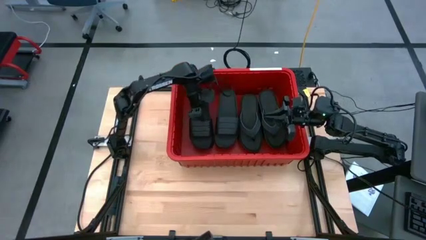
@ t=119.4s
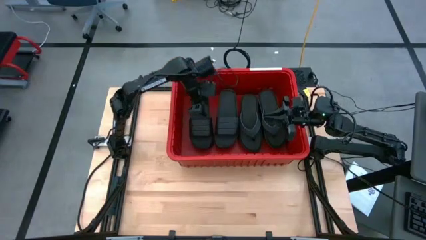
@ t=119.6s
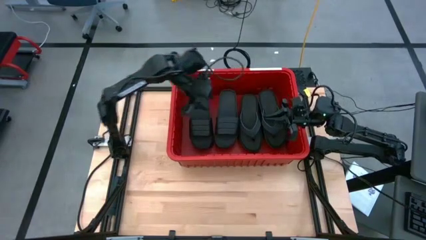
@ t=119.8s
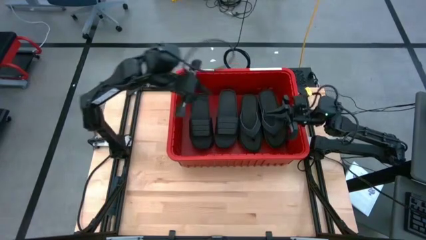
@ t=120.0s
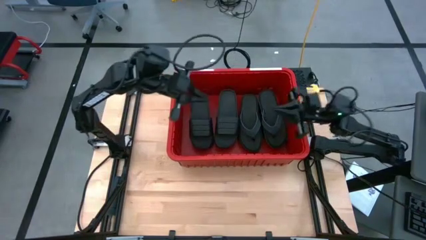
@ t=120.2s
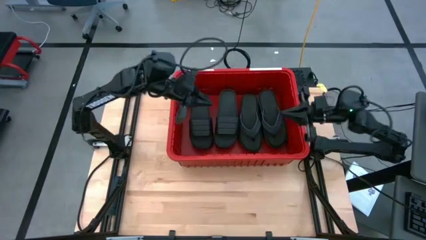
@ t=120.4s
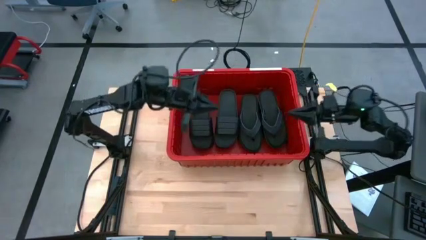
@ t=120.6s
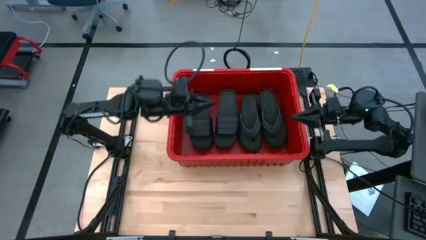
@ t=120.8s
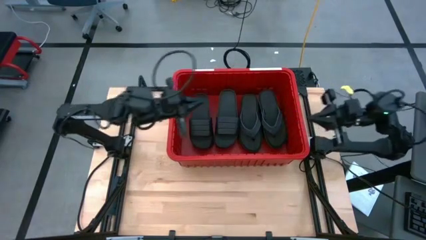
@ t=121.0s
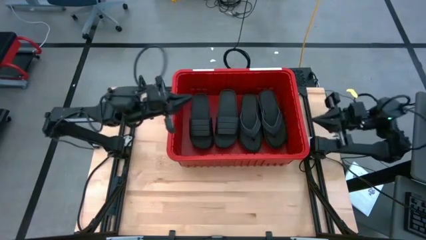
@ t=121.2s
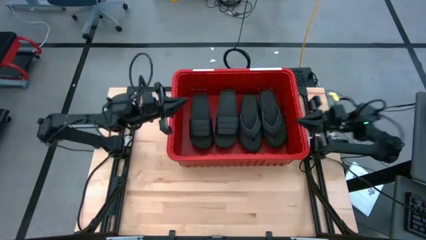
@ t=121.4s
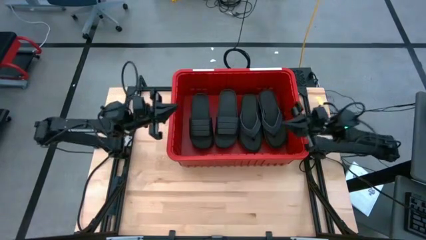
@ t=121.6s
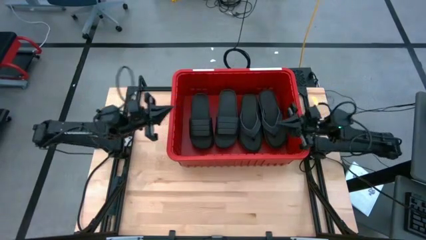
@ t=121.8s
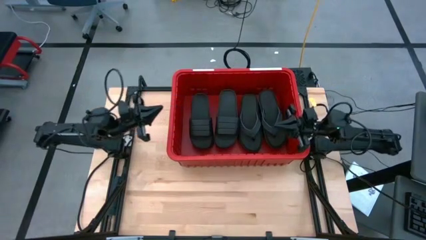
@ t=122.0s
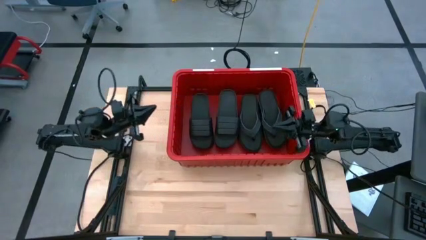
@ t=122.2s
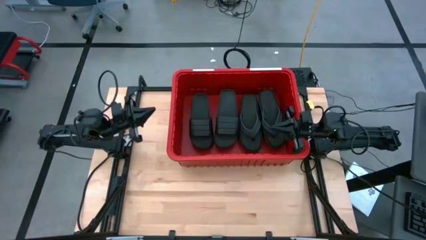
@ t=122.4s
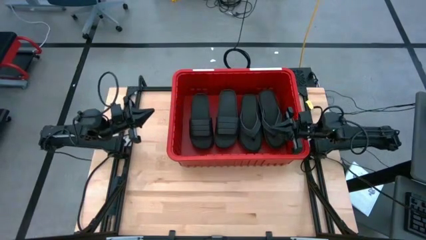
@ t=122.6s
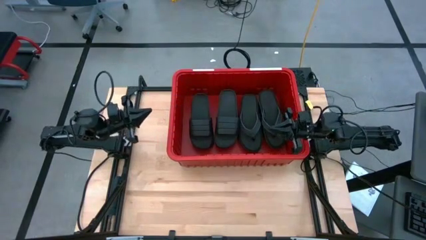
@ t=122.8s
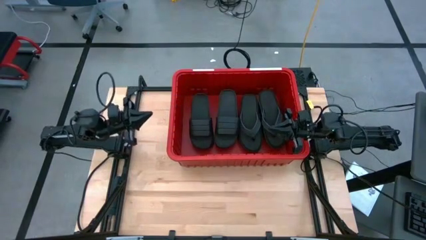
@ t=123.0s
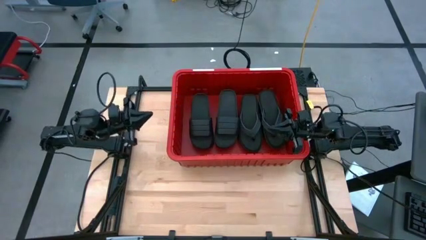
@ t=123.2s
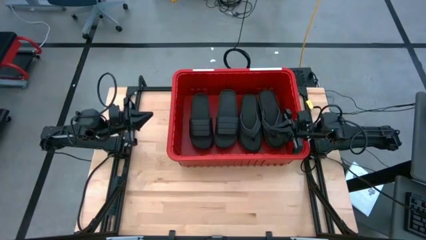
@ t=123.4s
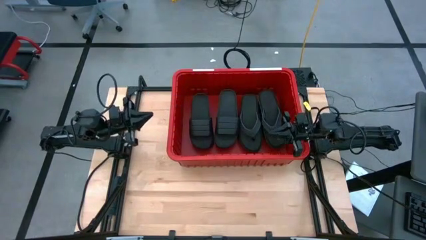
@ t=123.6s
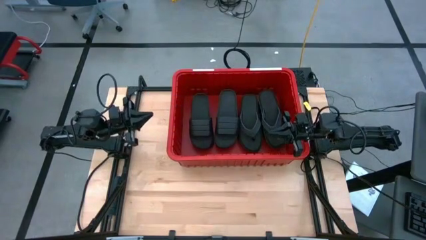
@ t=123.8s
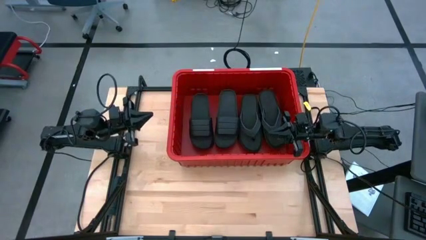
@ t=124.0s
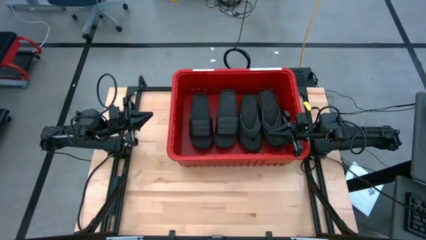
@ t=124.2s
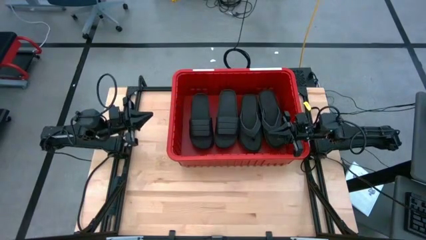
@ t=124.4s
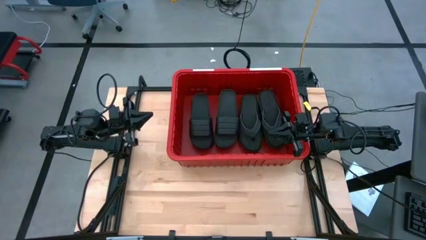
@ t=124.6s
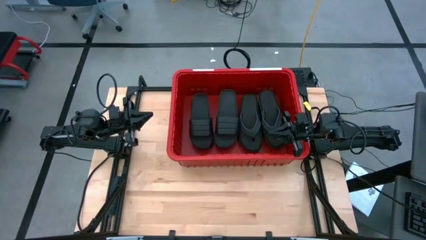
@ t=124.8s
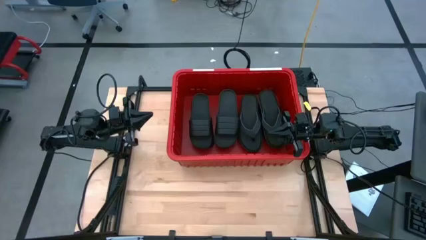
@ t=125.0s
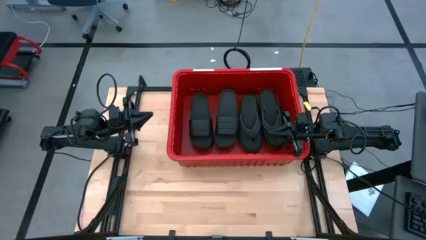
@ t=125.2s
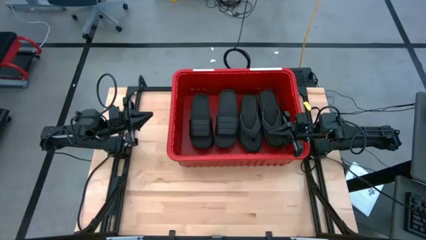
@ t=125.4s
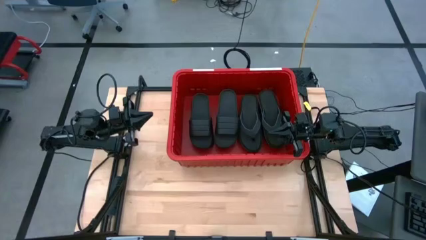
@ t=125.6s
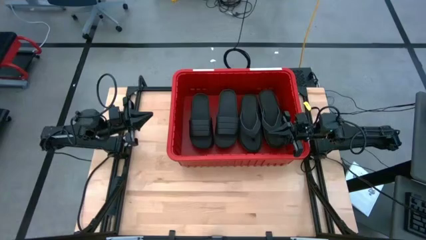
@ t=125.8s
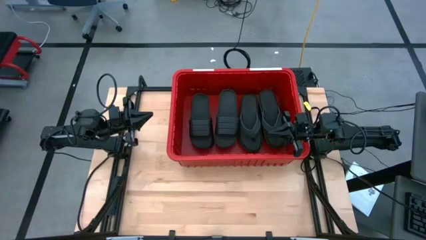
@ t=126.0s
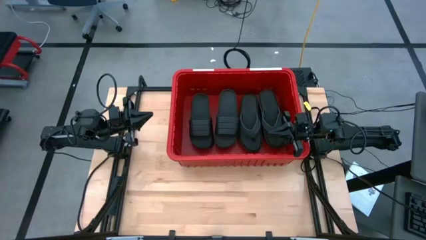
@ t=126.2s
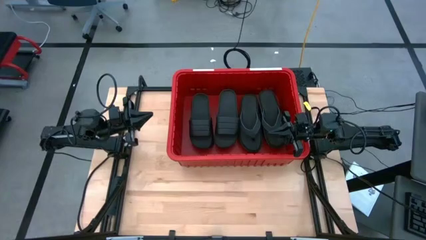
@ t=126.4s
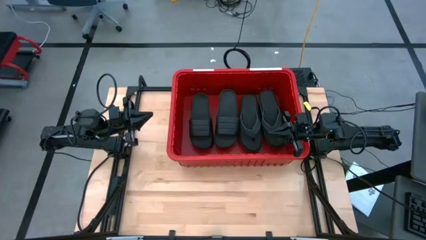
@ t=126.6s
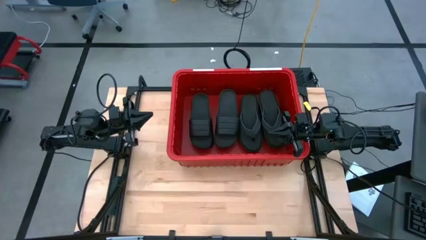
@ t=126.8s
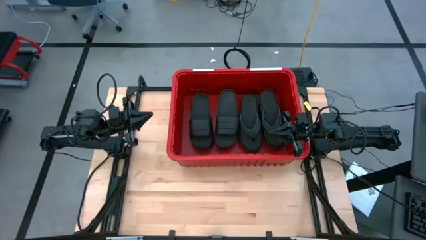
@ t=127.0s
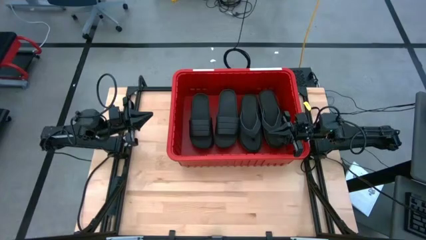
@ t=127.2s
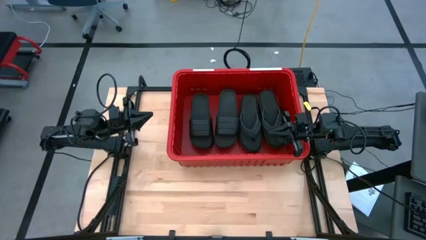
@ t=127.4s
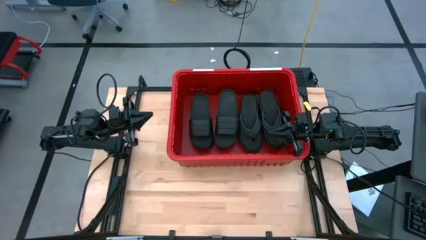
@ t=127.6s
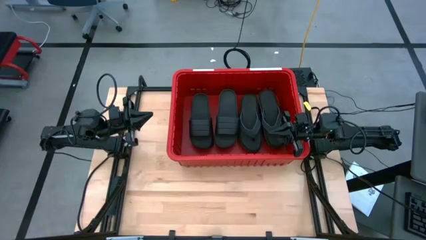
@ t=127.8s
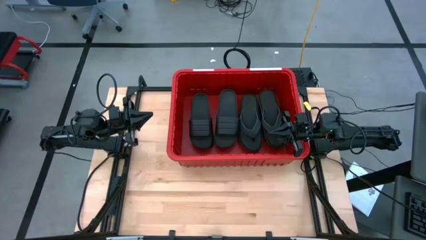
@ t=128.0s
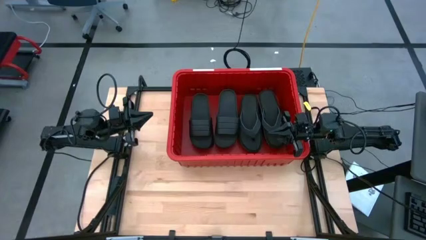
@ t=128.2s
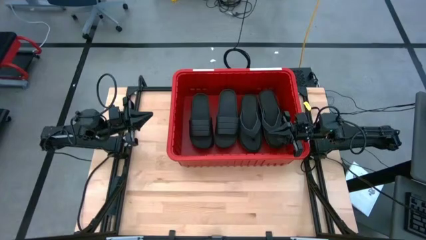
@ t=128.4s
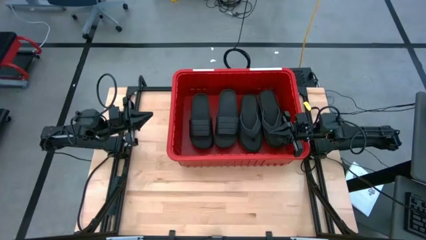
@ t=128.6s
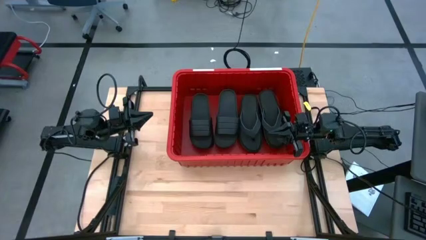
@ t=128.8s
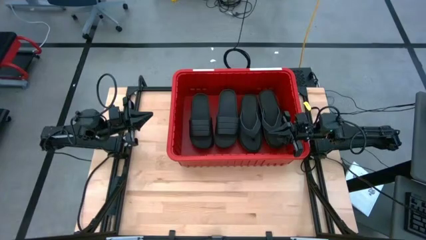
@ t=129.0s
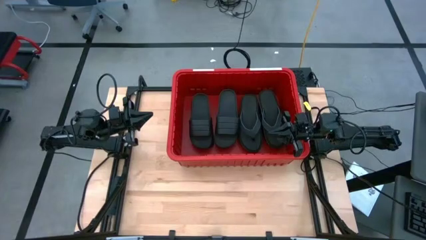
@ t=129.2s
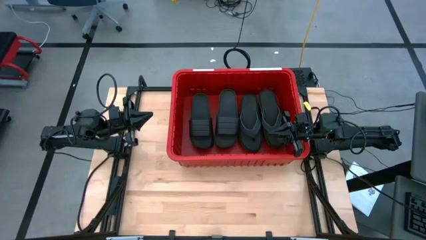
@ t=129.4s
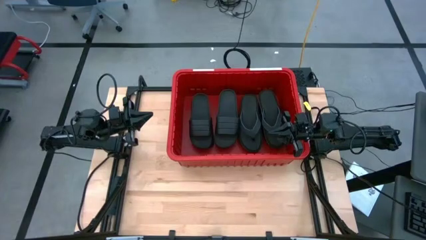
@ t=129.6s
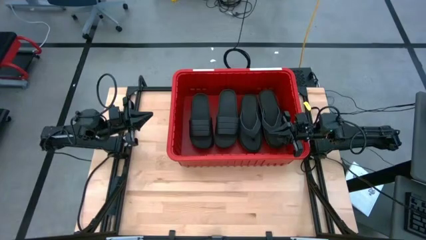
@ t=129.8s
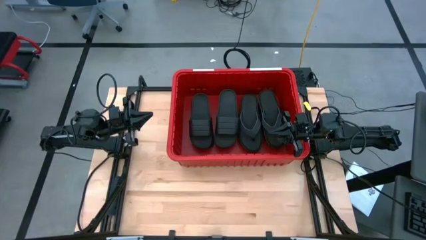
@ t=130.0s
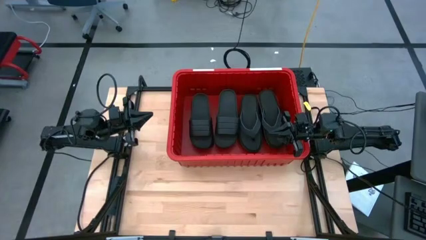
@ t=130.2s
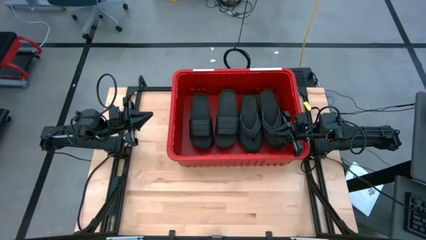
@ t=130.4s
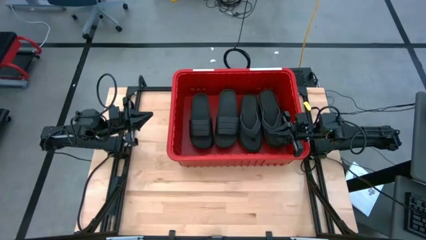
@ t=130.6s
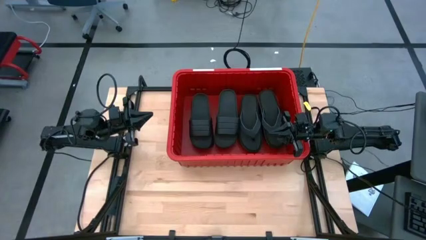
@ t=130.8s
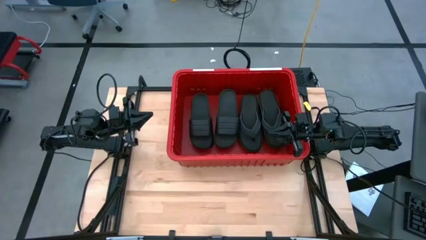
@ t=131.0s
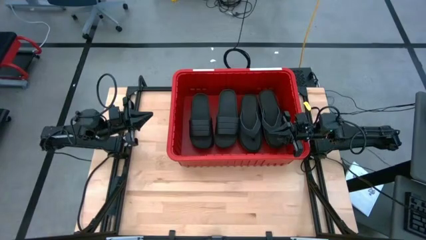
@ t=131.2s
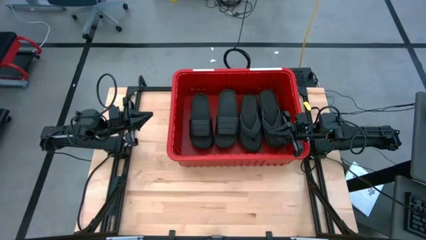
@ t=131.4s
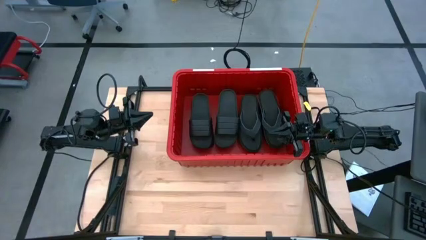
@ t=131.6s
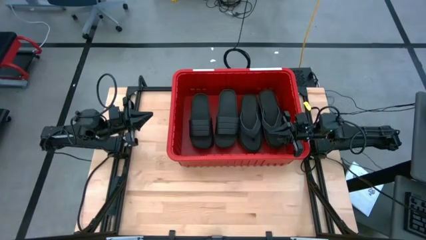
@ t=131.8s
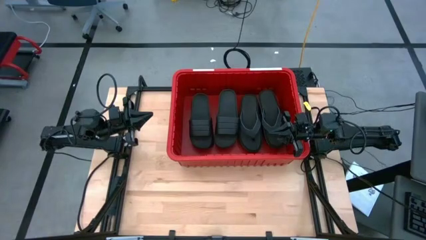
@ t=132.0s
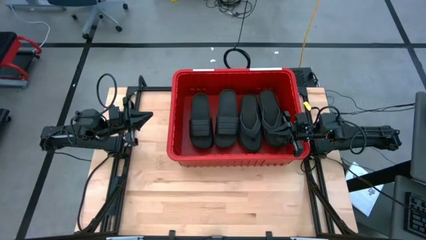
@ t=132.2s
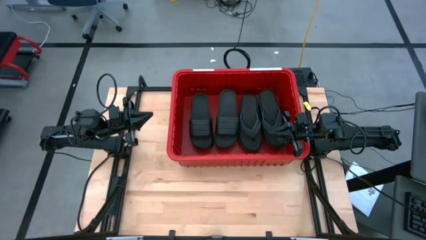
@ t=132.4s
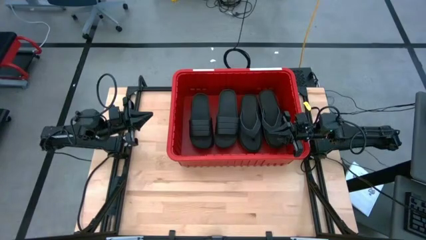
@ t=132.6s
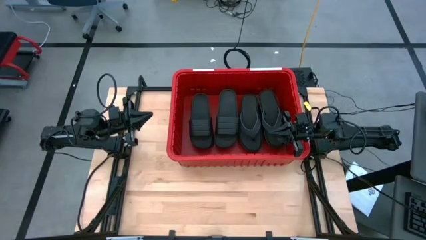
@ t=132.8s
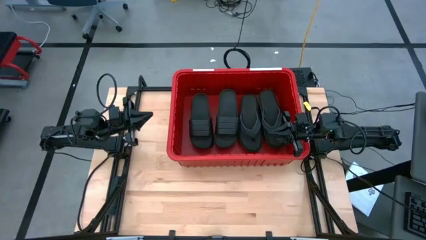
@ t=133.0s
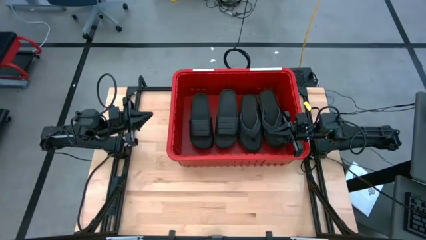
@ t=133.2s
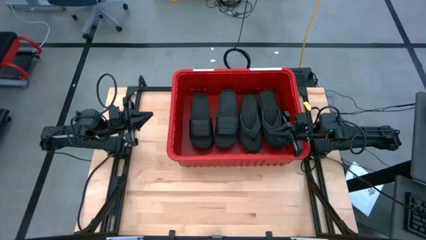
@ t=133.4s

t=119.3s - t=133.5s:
Task: Pick and place slides into bin
Return to Home Position

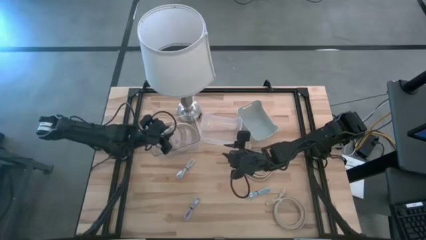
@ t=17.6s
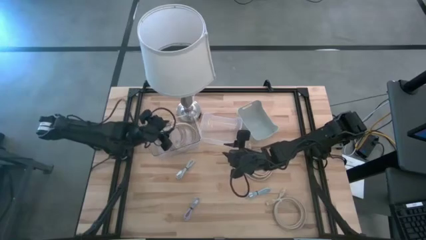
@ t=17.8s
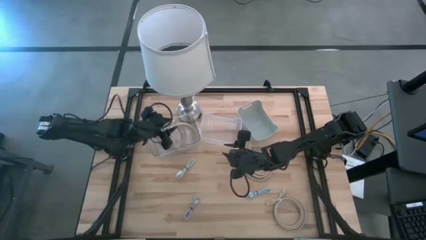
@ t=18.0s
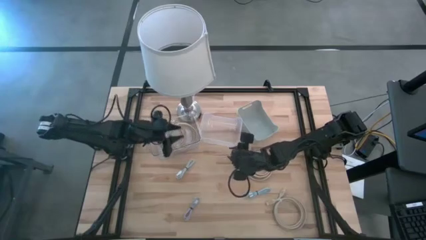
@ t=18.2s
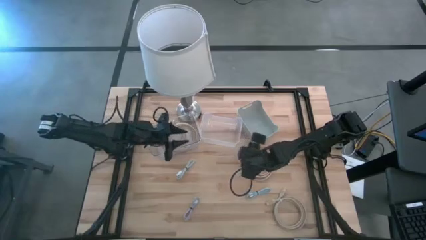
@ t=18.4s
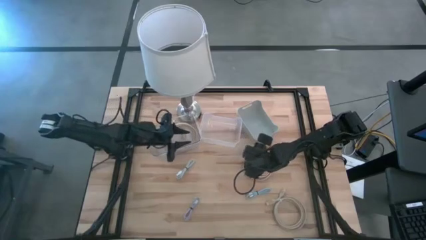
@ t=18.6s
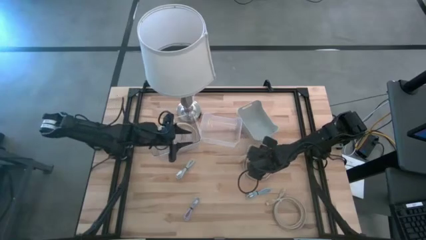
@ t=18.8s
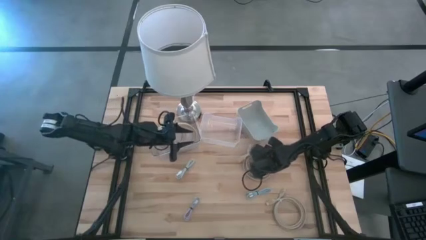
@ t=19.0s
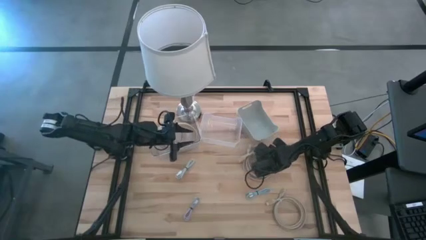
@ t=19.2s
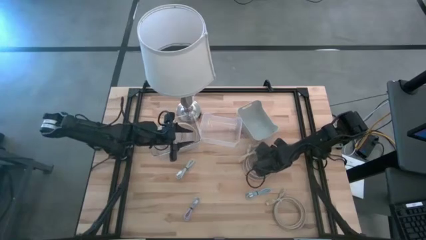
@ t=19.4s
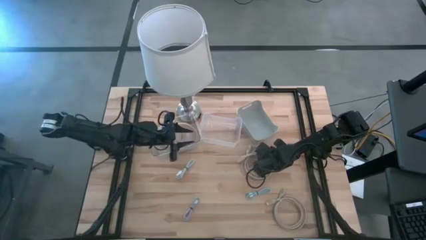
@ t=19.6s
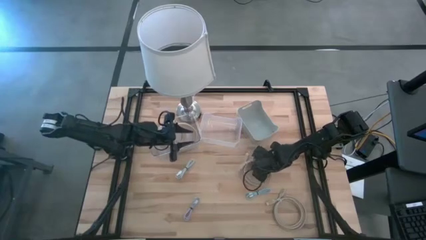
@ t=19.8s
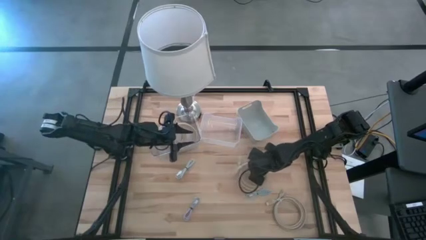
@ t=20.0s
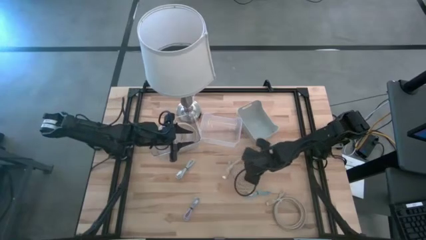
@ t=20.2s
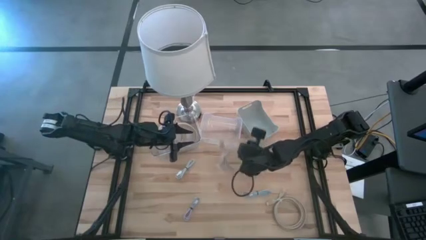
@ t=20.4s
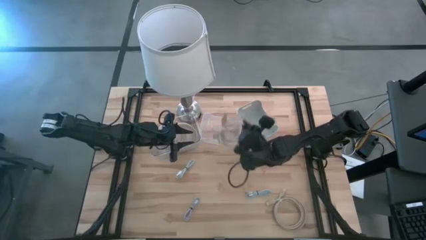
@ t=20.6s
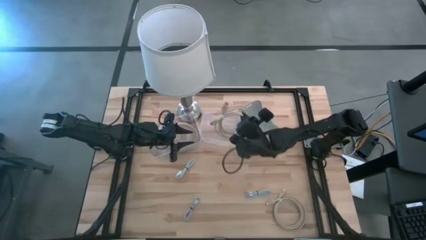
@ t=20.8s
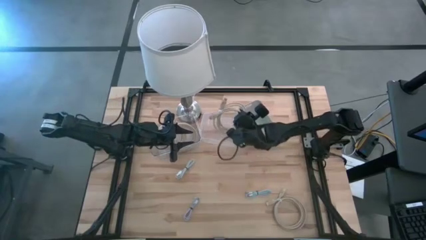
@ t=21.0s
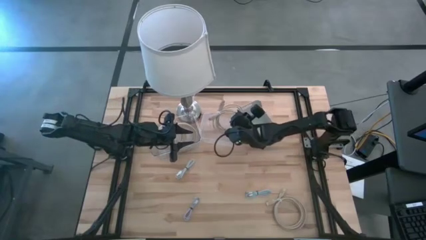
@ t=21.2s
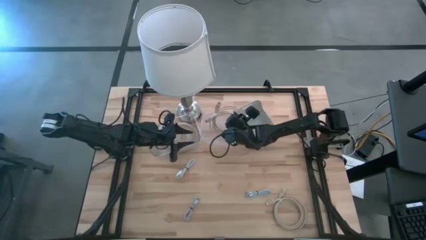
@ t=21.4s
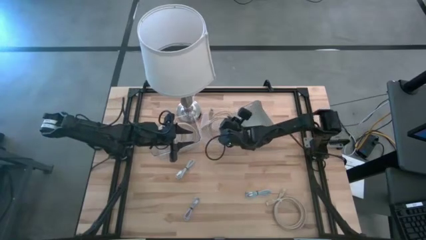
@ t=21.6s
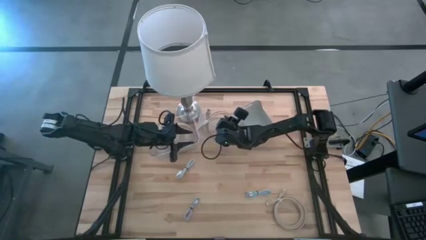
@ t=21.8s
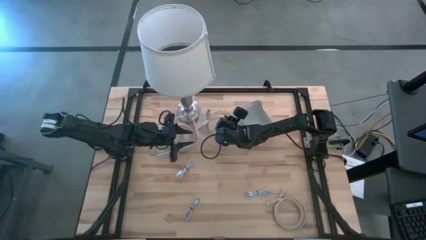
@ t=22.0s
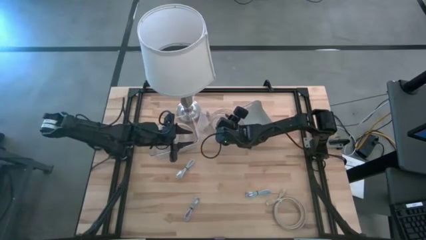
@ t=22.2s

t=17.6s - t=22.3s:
Task: Pick & Place USB Port
Put the brown HDMI cable into the white bin
